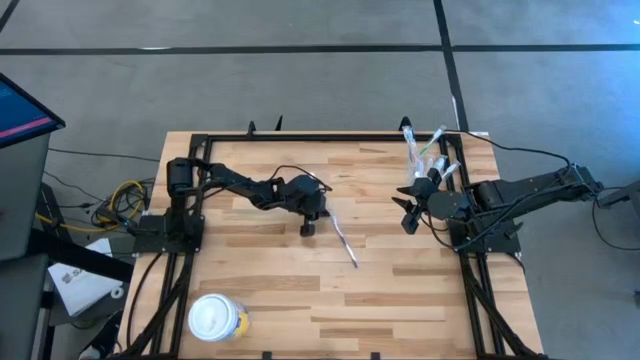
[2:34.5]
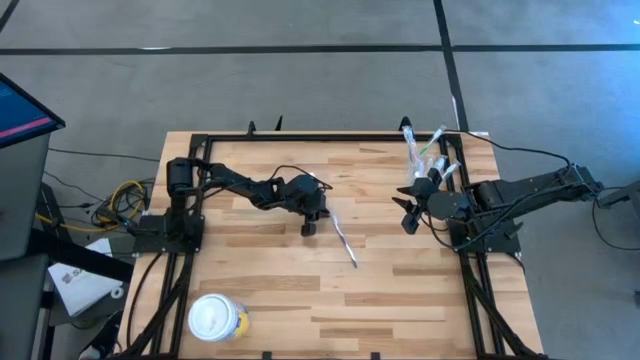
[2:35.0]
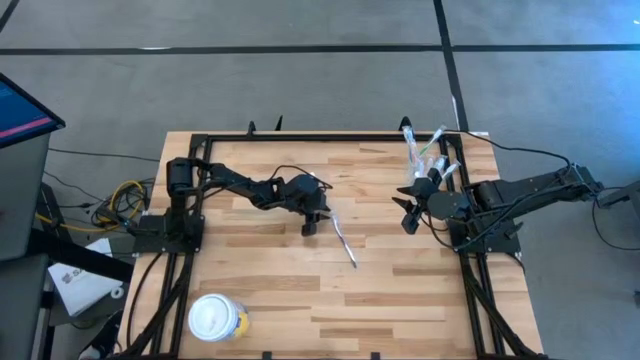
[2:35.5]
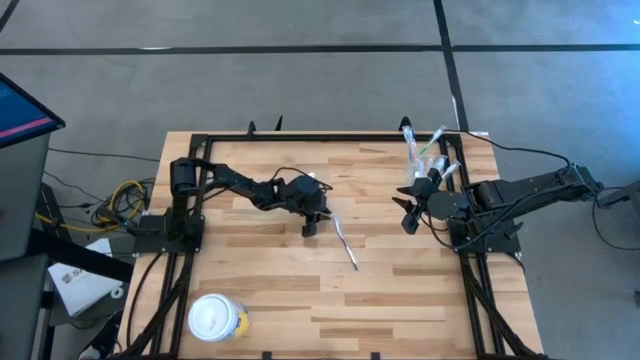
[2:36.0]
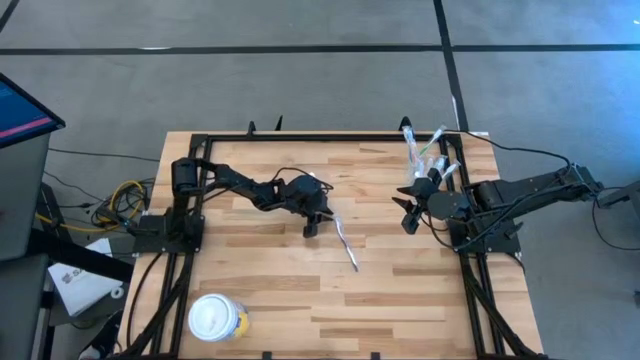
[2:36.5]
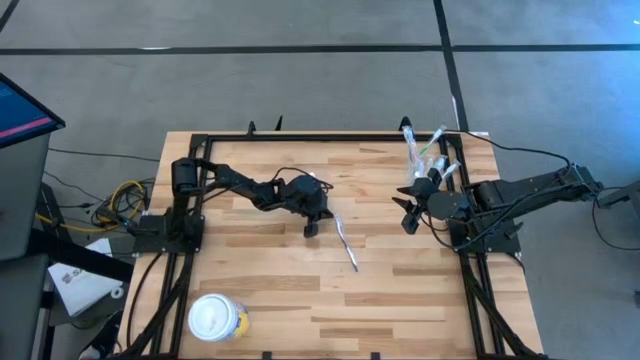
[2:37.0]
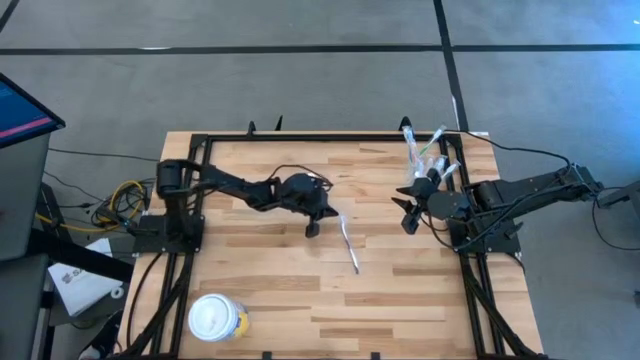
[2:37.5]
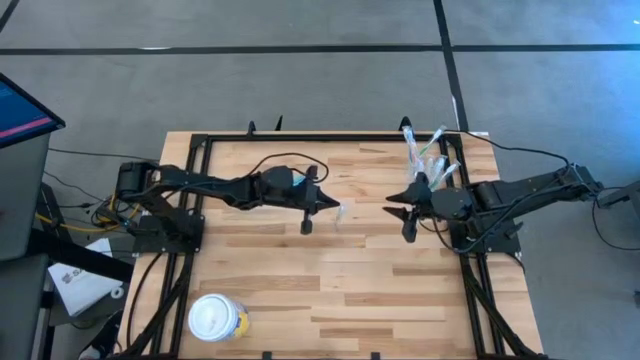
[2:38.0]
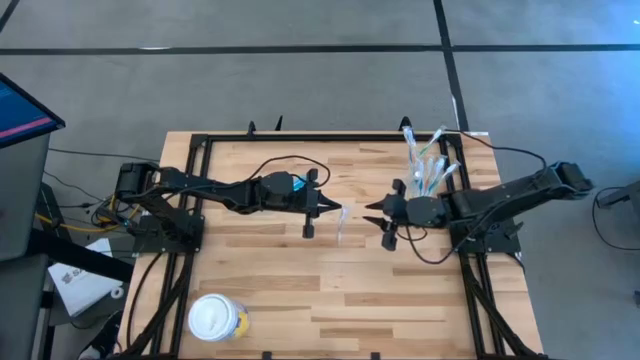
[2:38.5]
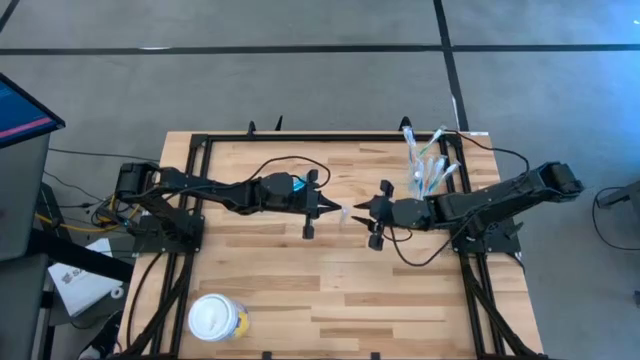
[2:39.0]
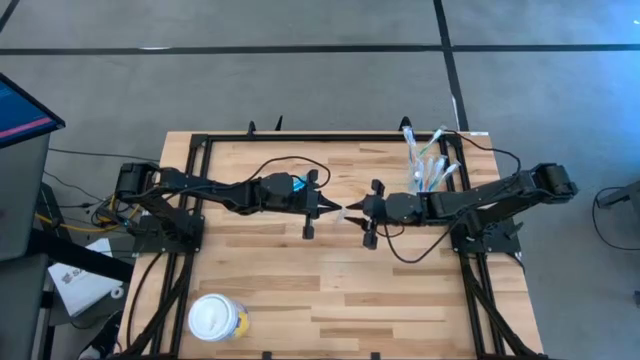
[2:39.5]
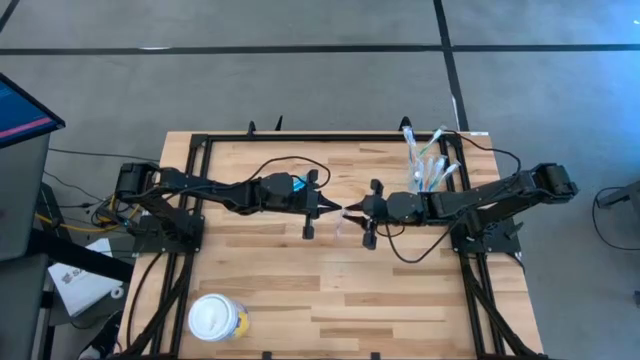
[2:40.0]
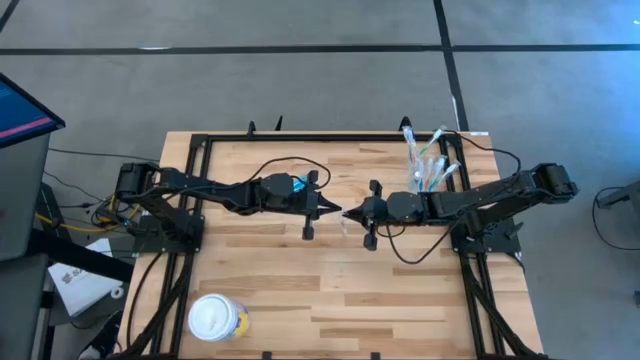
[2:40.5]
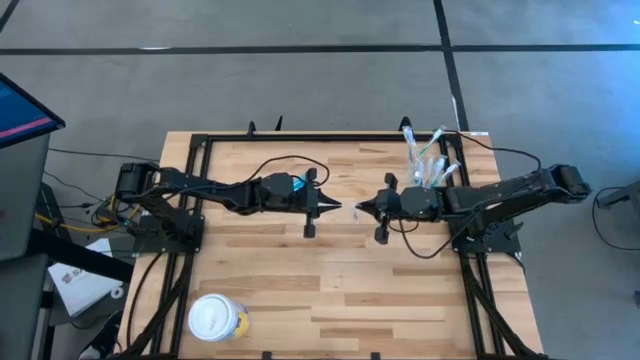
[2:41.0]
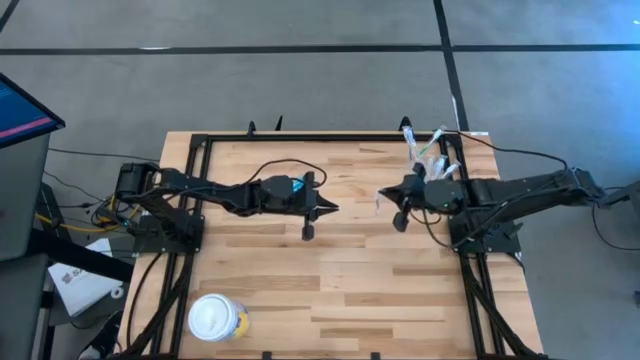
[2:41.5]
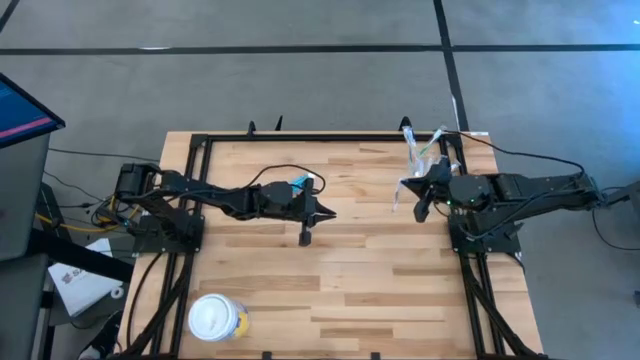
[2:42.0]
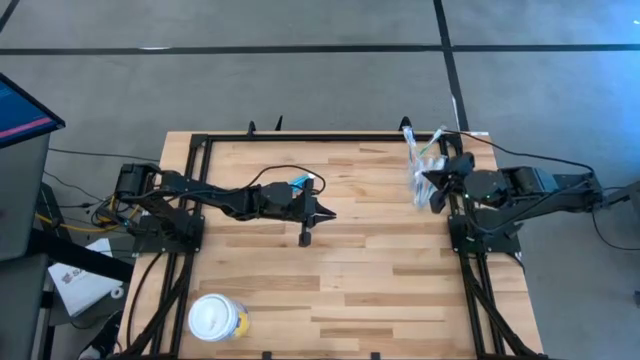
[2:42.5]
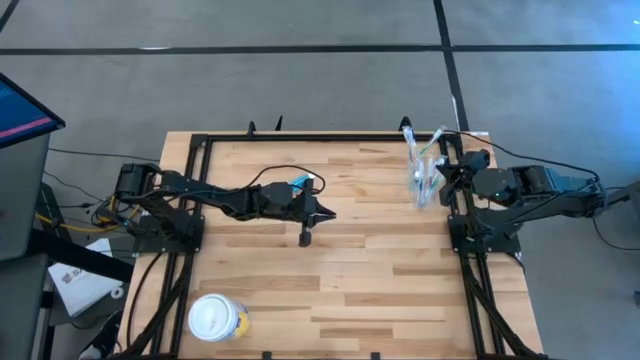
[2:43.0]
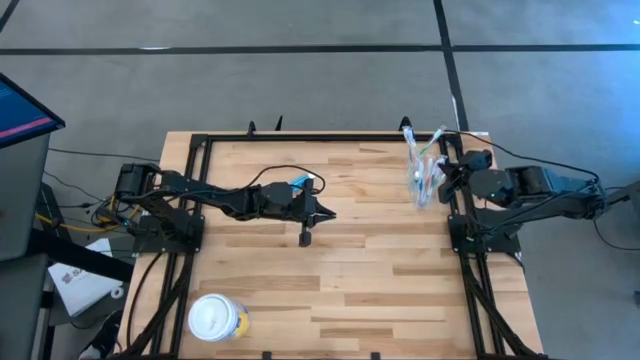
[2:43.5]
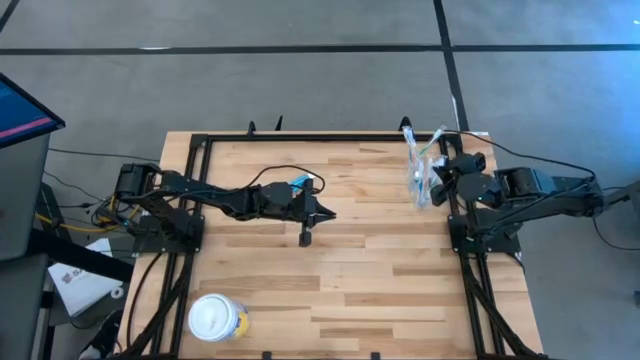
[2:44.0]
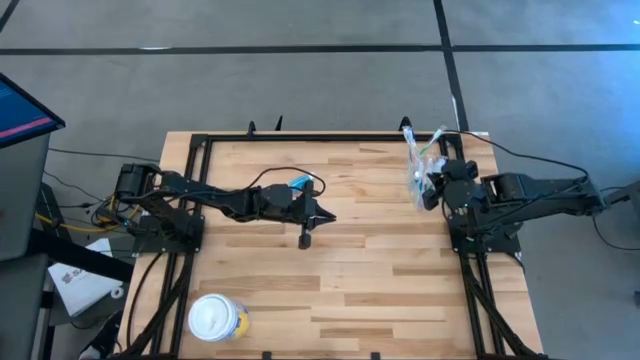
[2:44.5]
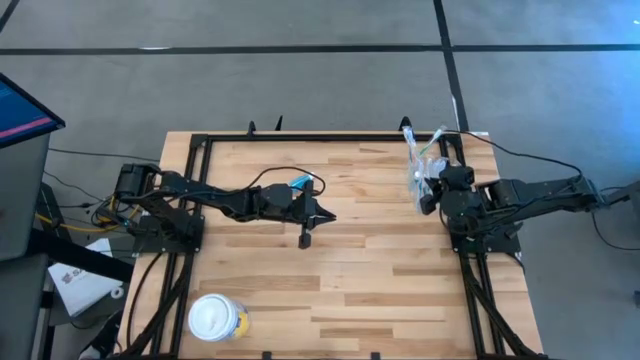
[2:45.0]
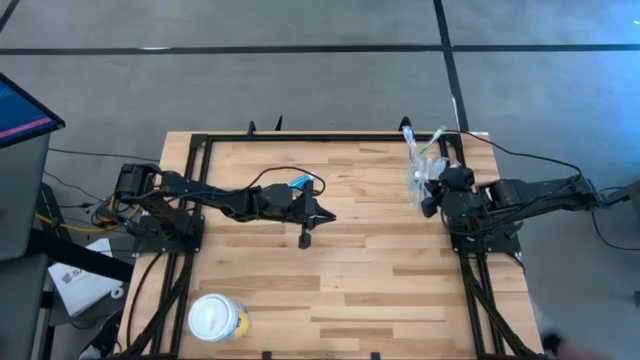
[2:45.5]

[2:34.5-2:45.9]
Task: Pick & Place toothbrushing station
Put the purple toothbrush into the transparent organizer

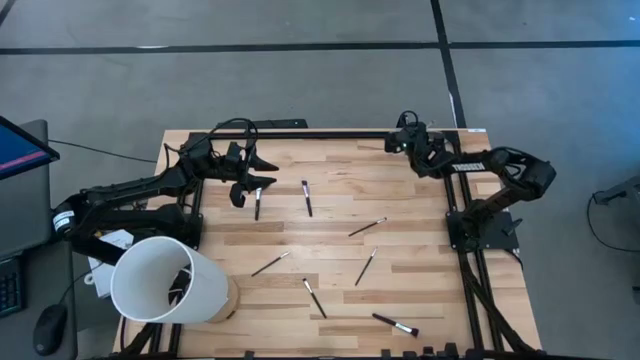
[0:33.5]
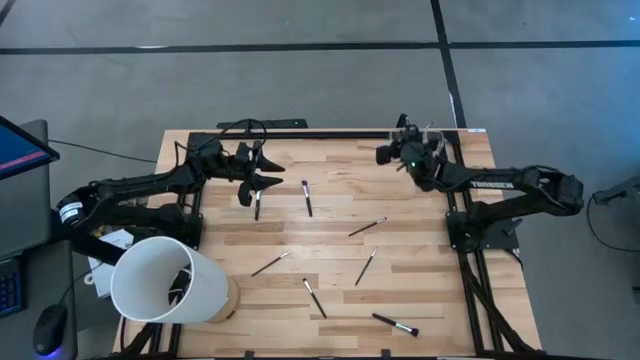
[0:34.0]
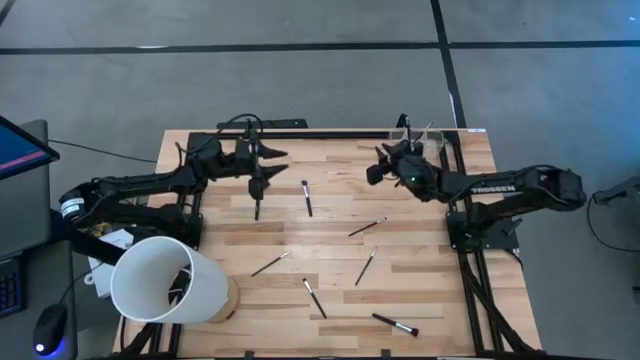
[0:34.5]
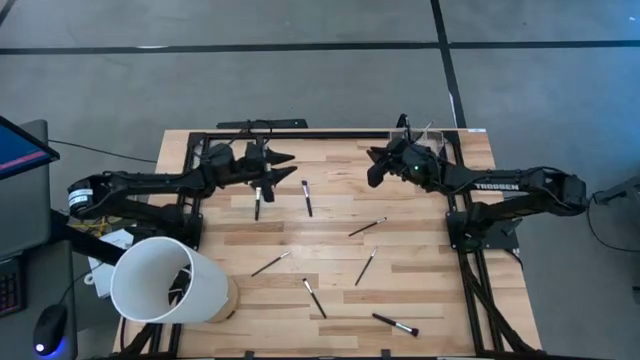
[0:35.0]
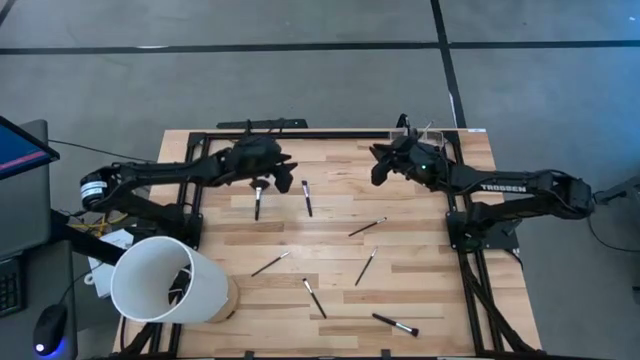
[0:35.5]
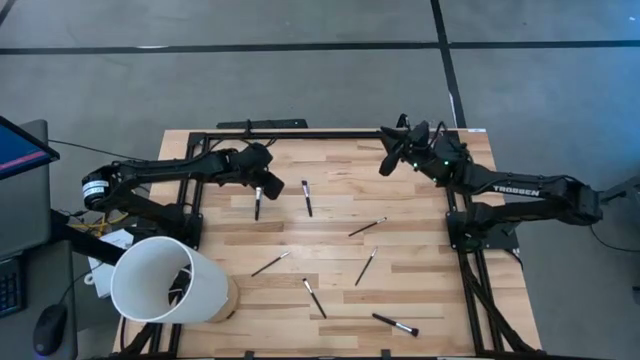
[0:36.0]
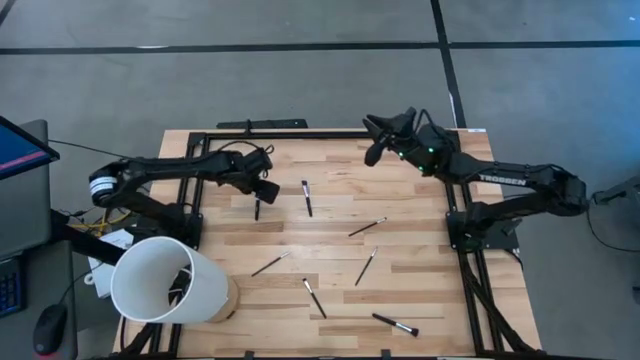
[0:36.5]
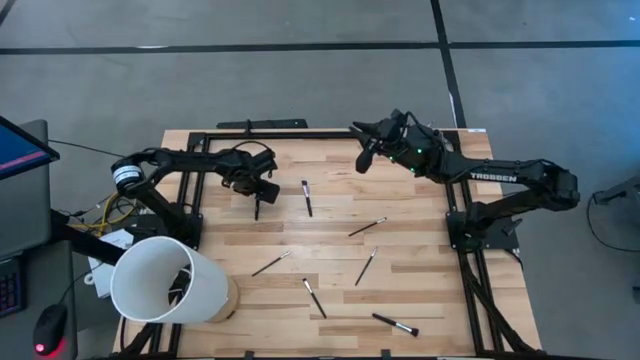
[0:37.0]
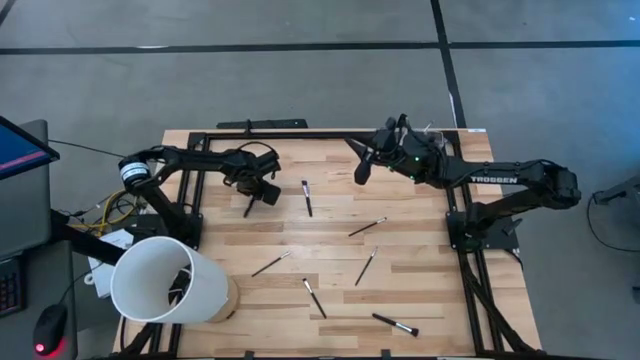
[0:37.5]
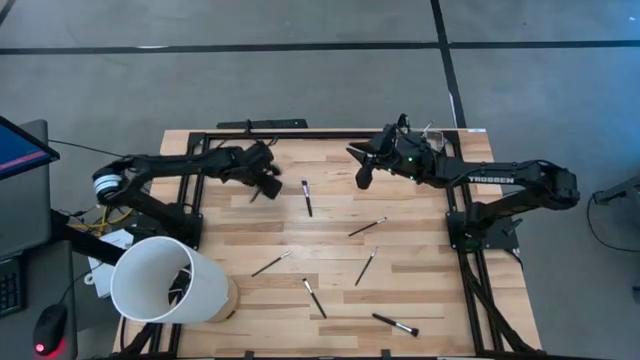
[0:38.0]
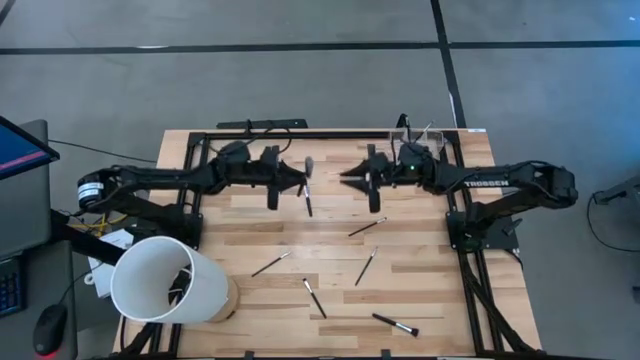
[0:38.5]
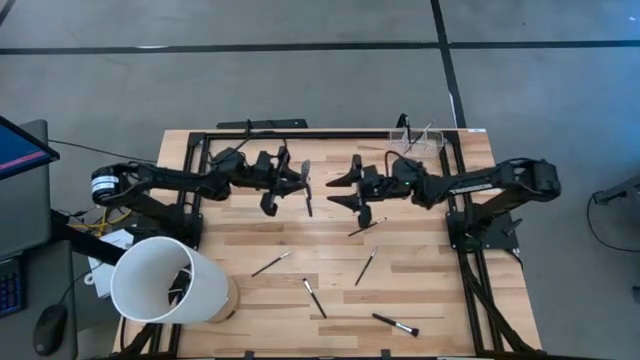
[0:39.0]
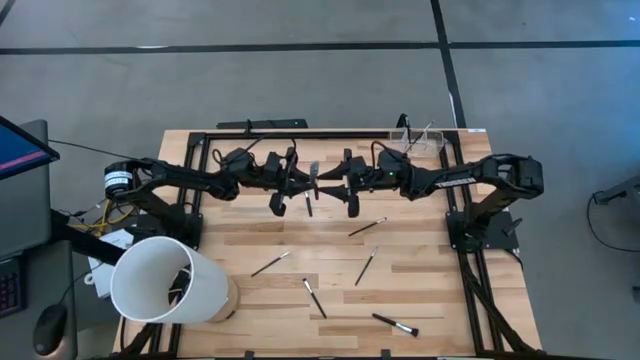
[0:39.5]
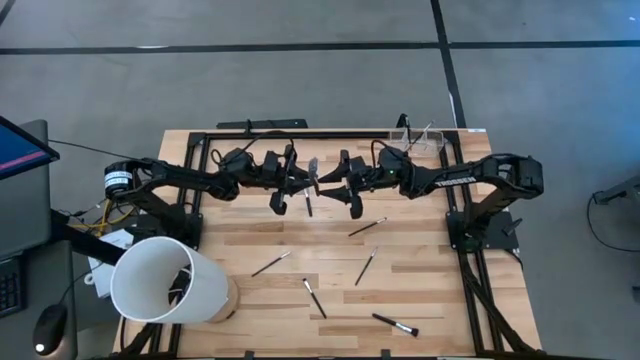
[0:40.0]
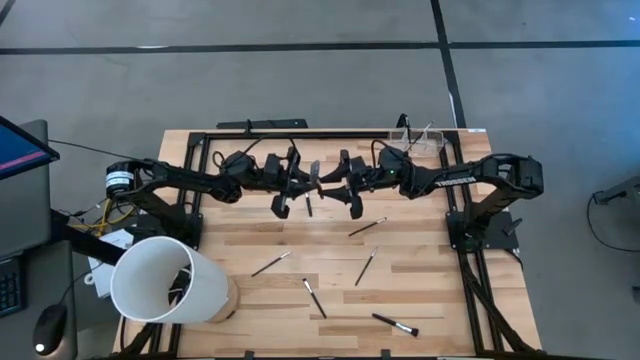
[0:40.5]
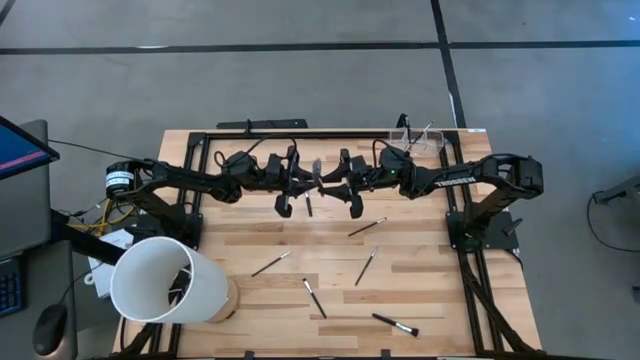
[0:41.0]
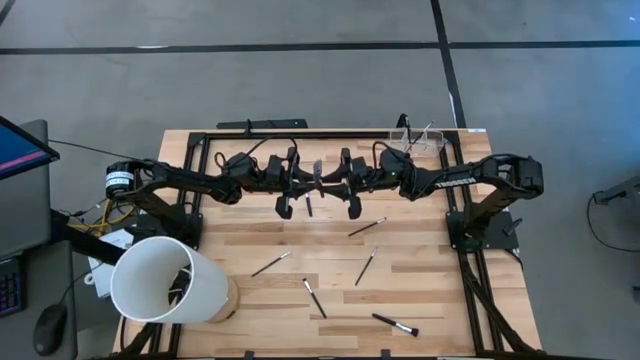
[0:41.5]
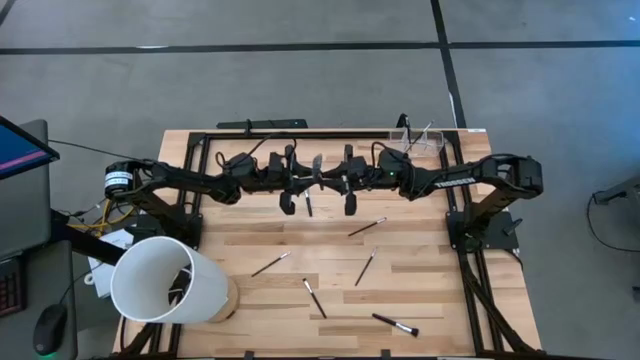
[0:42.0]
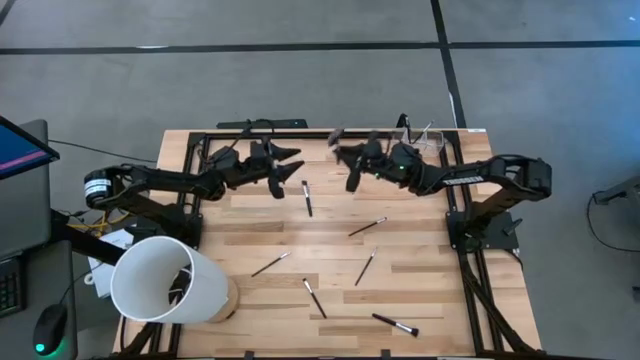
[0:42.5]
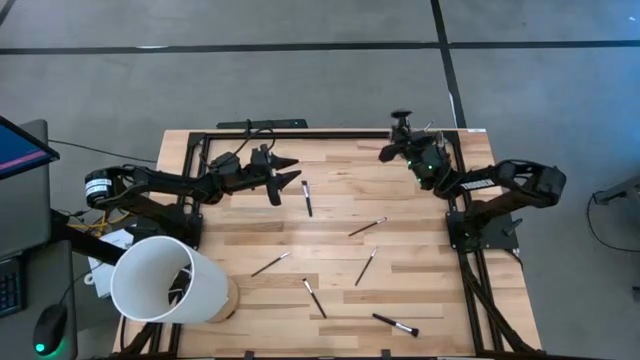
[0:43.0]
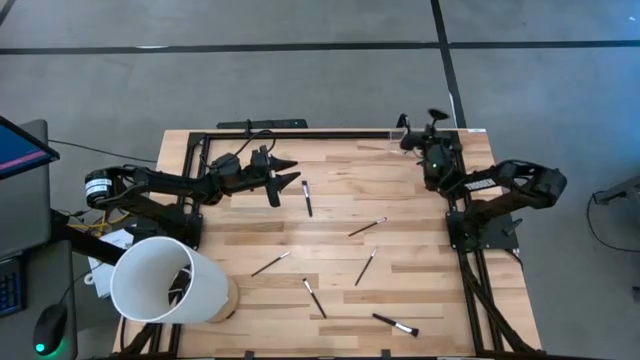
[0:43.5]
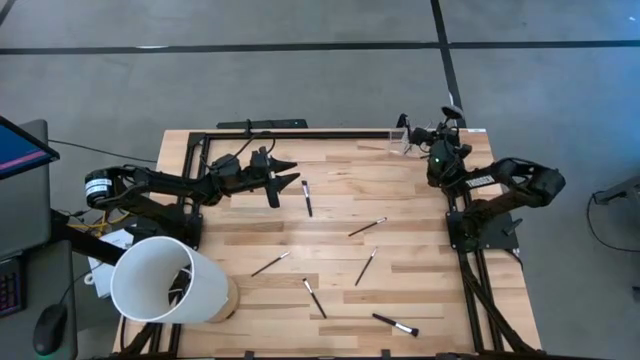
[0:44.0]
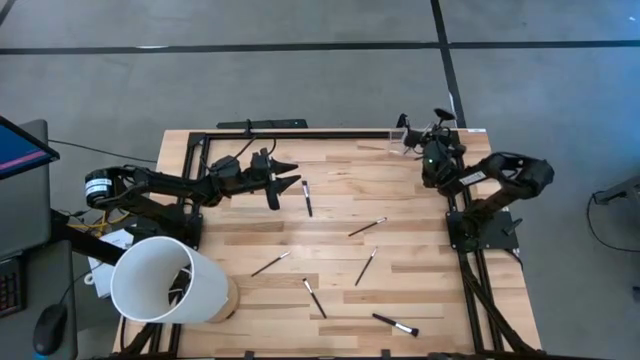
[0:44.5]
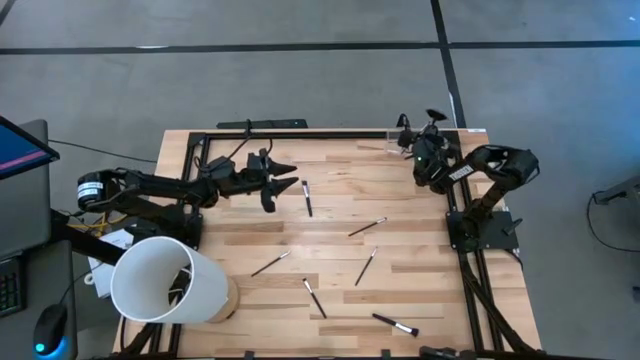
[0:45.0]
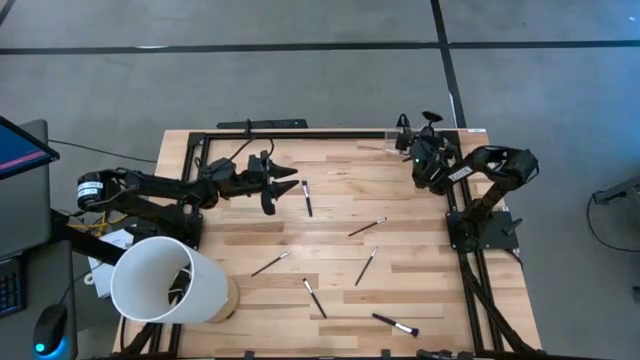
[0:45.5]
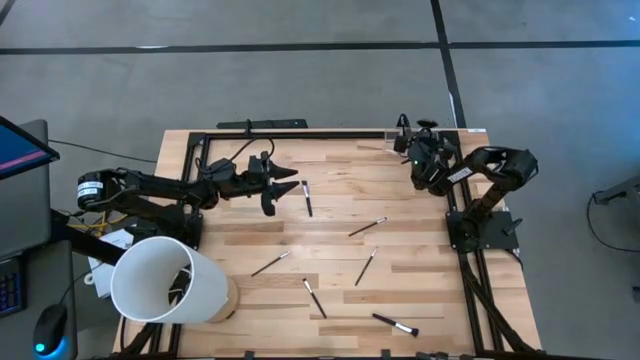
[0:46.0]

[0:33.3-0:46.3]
Task: Put items in baskets/containers
Put the highlighter brush into the right section of the transparent organizer
